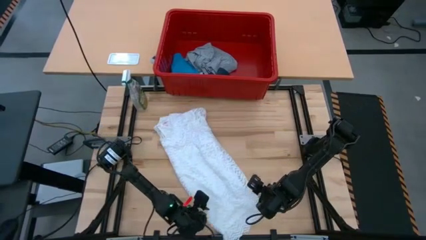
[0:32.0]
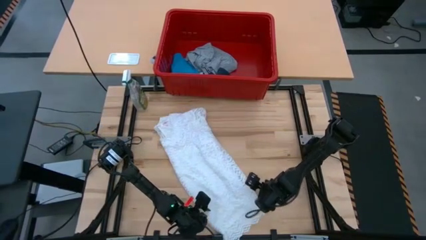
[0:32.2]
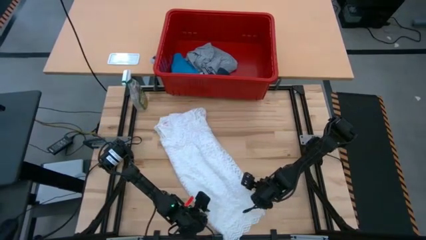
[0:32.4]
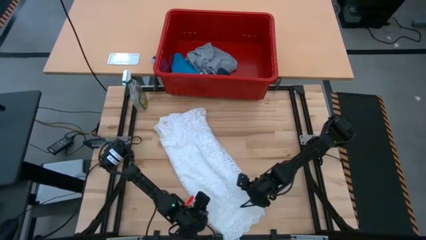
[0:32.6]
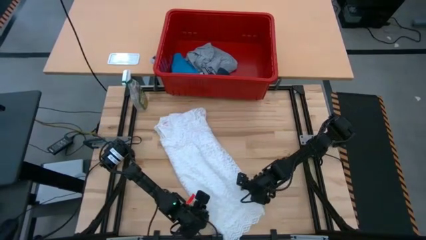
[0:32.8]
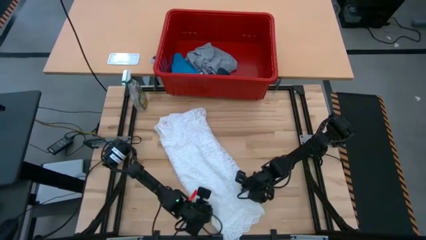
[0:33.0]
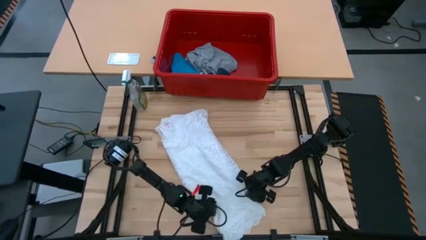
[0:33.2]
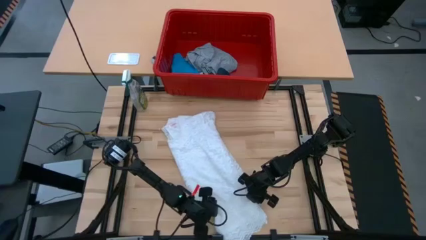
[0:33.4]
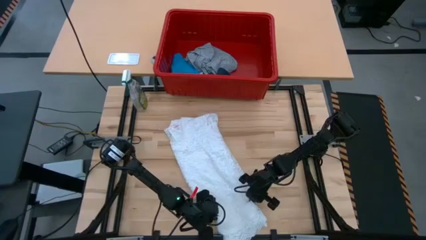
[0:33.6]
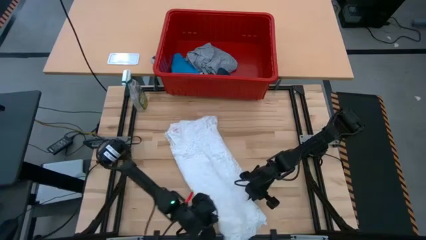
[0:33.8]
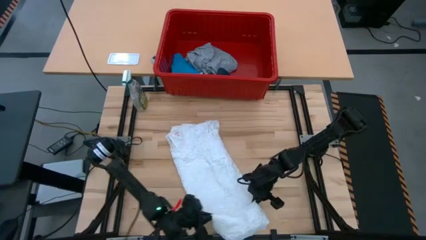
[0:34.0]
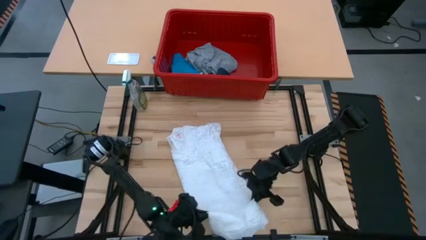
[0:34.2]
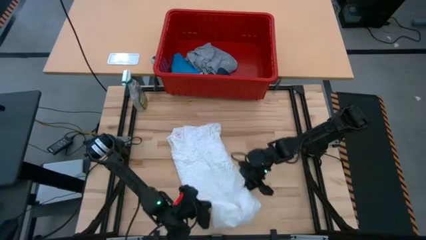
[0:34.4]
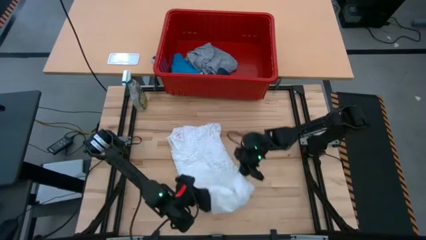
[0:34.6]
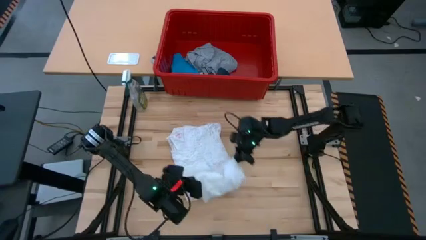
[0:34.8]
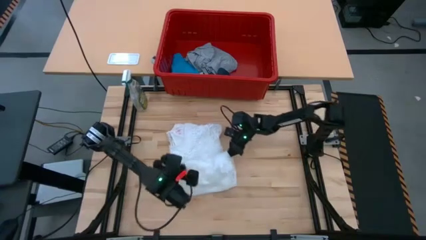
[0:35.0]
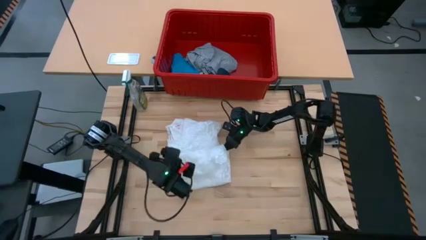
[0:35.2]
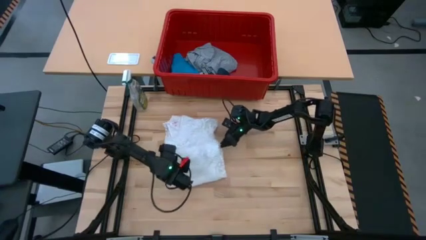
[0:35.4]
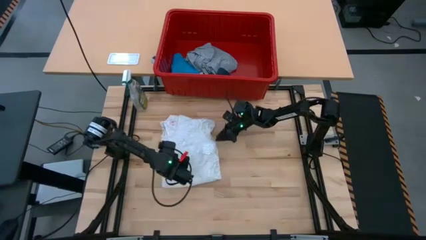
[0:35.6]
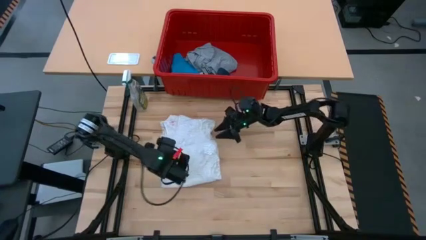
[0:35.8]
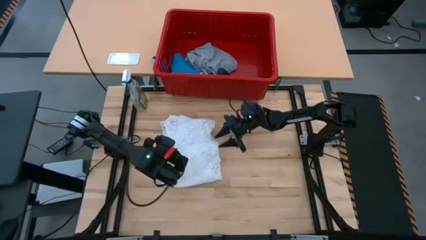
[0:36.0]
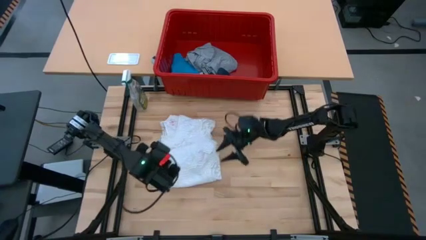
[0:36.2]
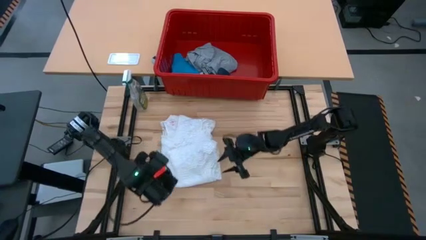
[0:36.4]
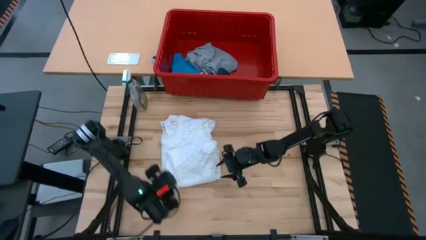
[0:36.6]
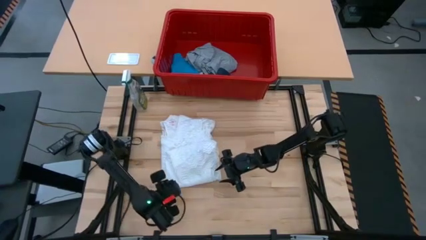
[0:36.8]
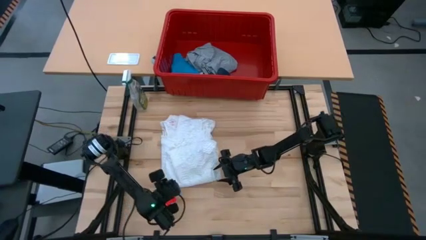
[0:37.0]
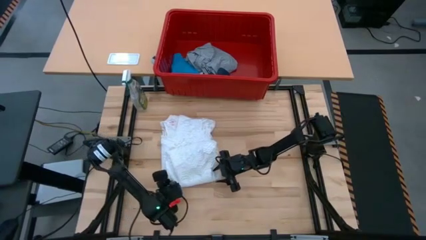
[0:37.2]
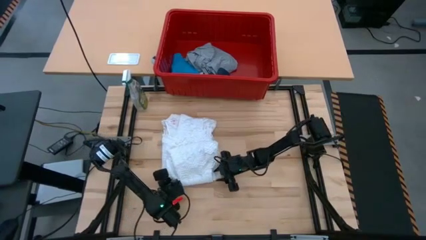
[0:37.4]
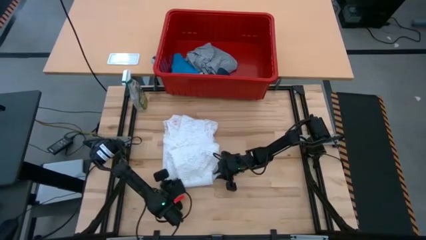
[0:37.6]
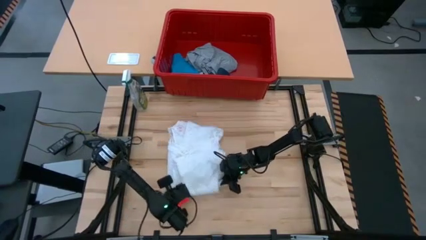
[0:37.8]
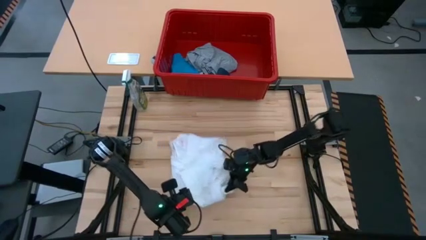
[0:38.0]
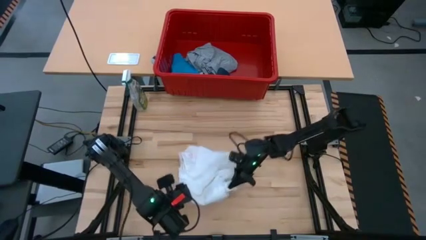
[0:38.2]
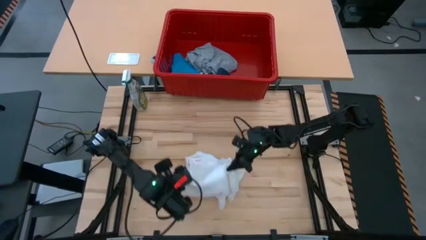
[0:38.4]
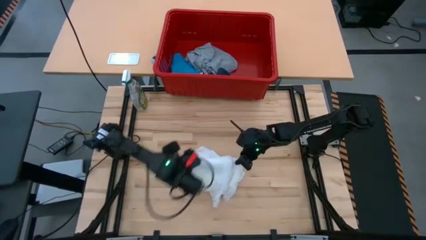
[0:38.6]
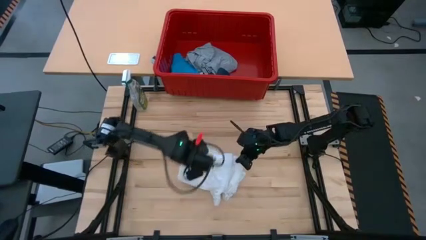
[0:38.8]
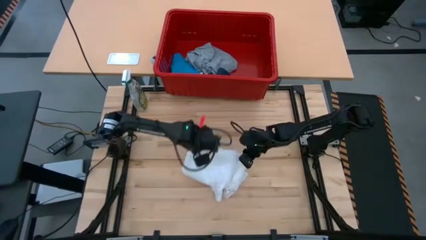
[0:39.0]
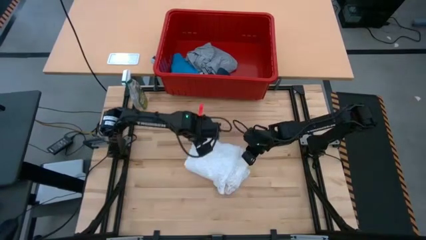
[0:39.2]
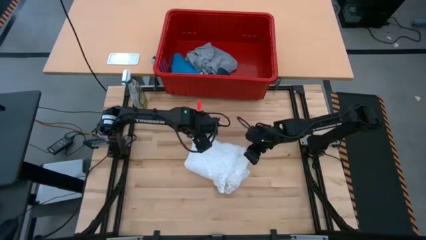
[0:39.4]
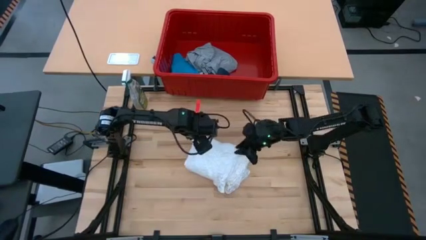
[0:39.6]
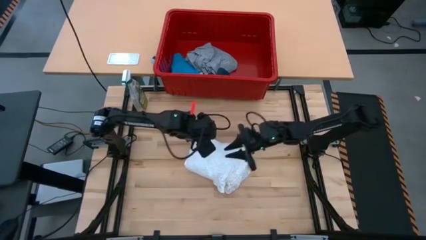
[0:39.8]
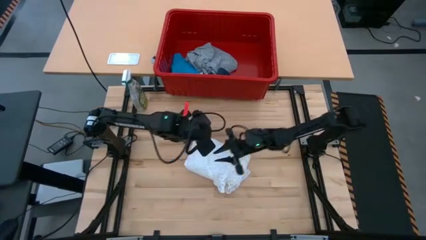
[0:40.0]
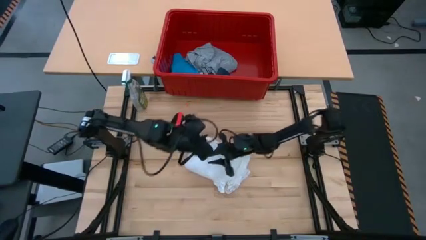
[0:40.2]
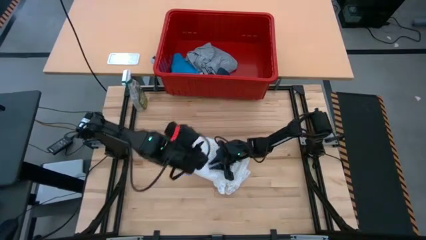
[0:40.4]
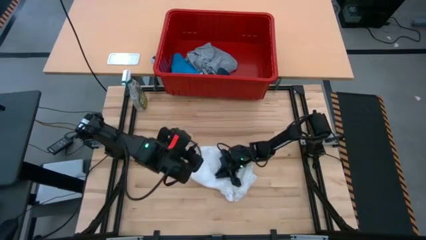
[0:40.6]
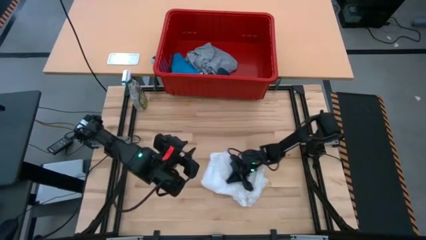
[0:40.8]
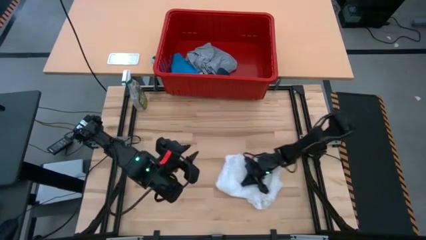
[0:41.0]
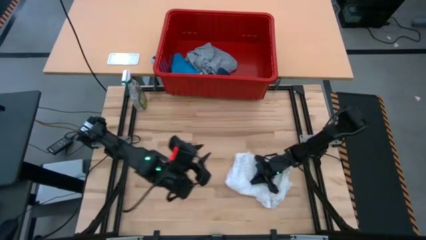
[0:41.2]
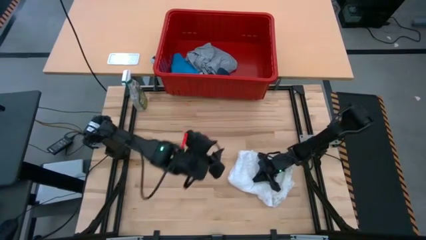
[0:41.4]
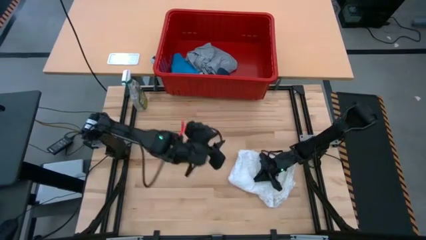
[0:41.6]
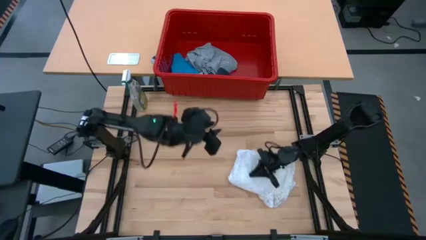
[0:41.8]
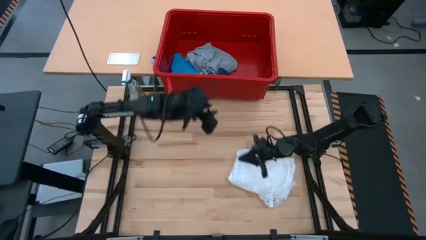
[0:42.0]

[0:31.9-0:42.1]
Task: Fold laundry
Fold the white dress on the table

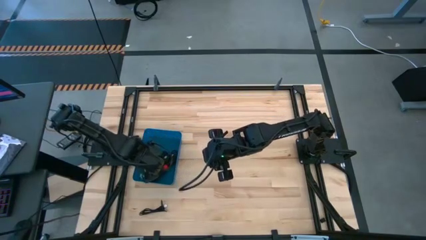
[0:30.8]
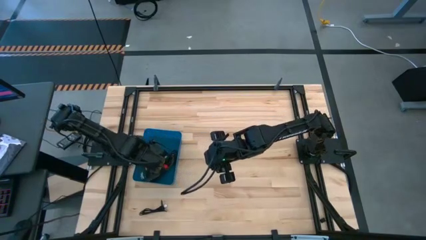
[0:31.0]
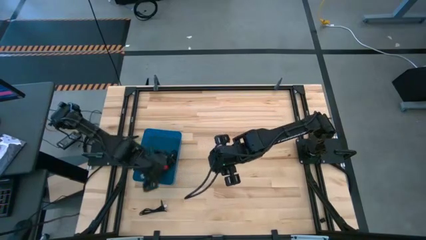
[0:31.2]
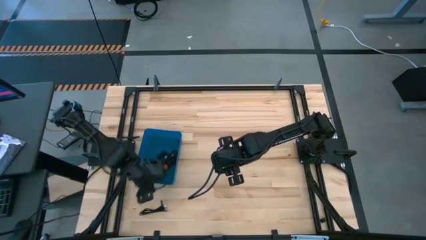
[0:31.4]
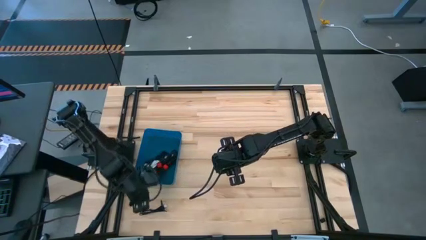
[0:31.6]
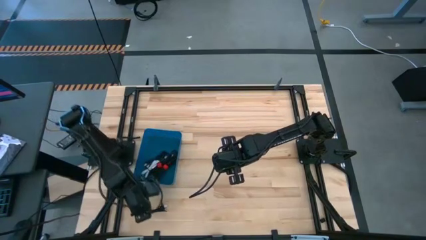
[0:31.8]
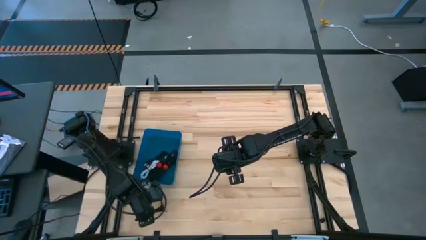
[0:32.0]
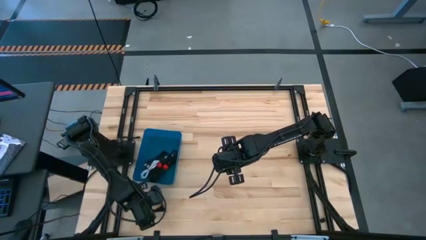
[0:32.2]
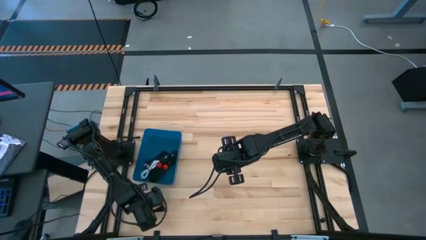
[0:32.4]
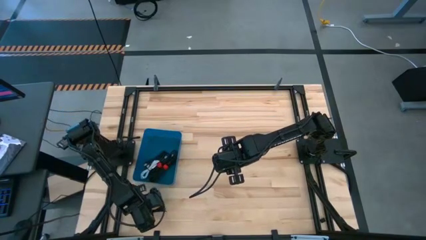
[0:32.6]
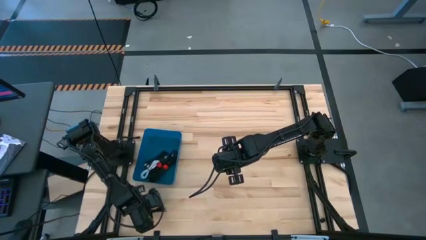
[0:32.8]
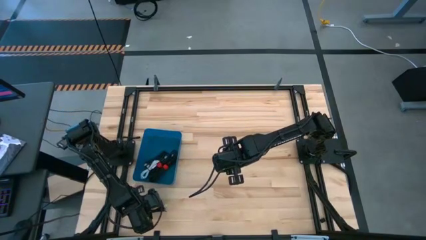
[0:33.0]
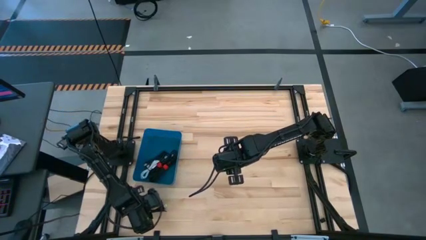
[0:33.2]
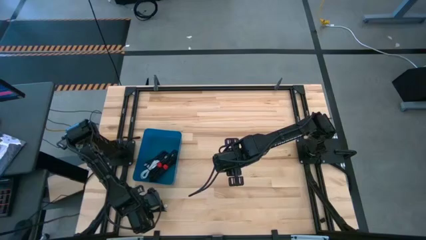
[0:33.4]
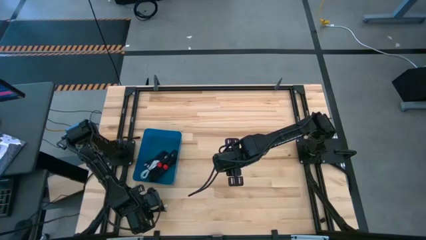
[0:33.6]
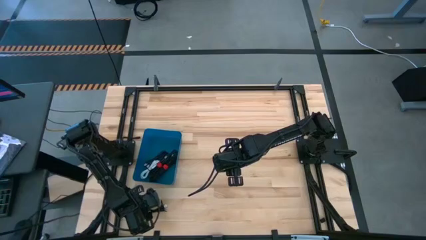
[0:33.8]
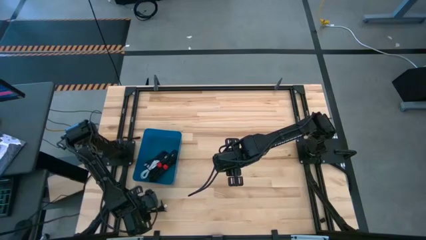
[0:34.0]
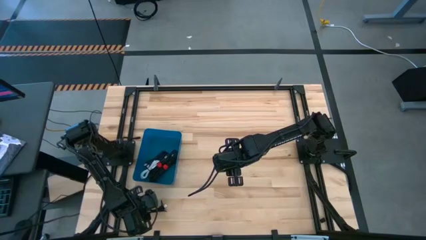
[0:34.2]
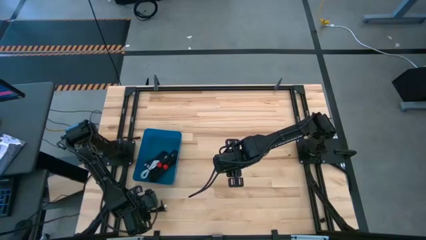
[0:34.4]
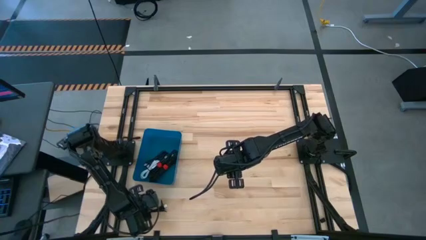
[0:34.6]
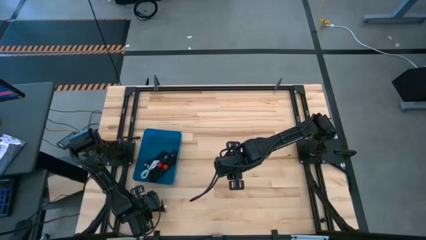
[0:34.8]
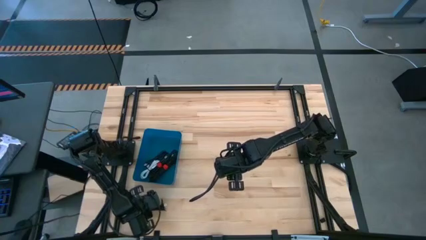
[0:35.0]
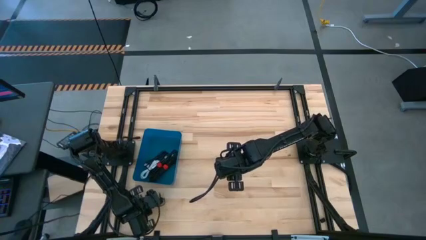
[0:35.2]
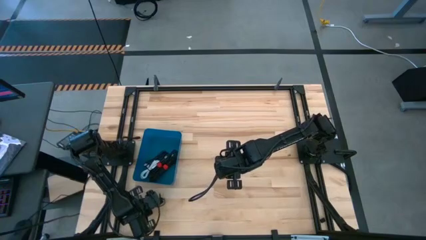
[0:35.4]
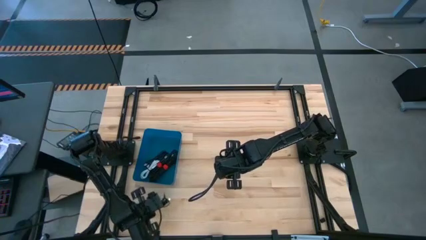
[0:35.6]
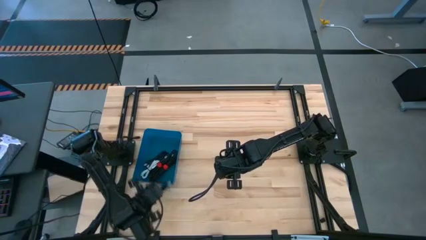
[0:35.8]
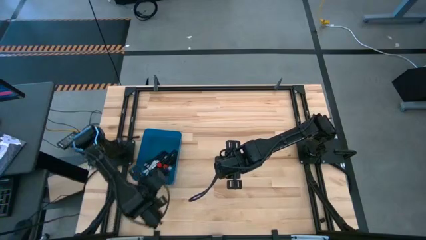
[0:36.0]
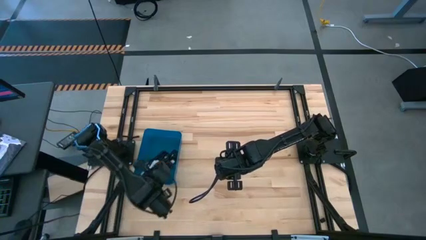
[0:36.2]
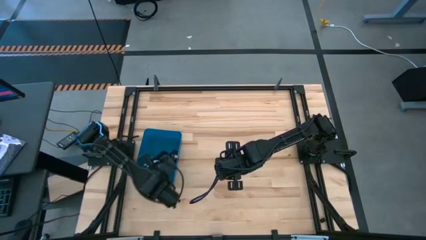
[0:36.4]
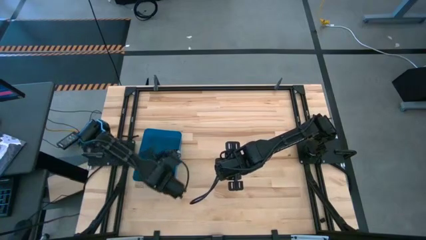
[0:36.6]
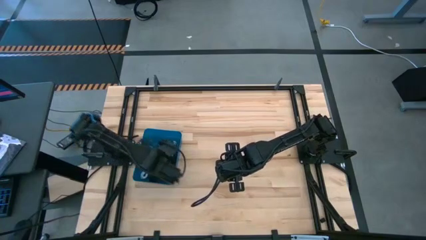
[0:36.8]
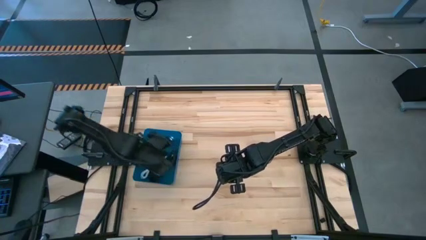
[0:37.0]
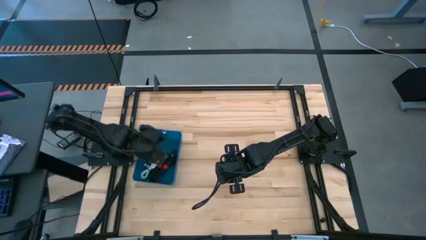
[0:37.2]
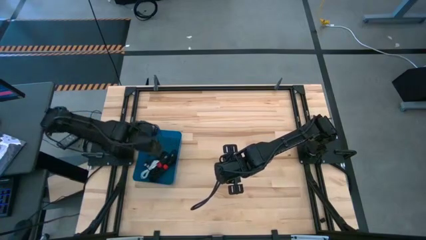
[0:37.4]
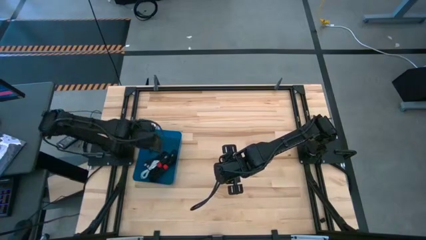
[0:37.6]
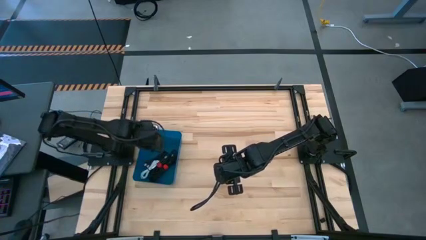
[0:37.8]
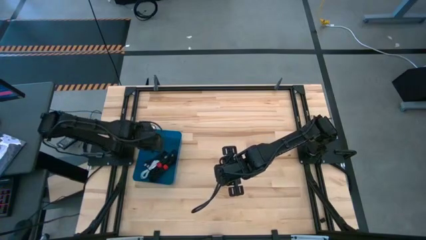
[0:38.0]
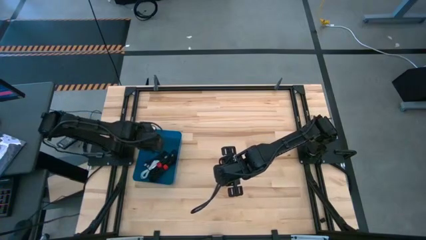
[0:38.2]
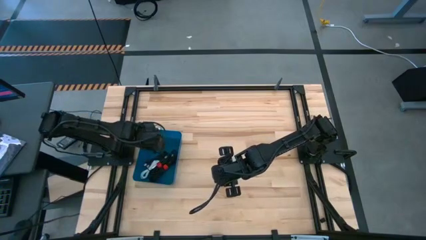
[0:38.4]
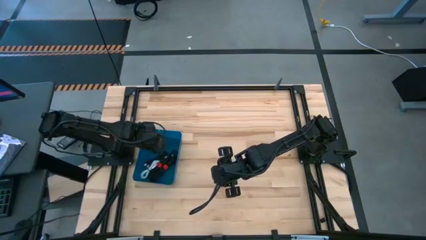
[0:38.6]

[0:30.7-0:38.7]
Task: Pick and place USB-C Cables
Put the black charger cable into the blue bin
